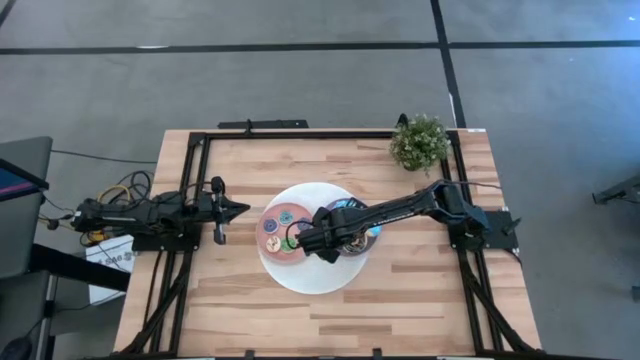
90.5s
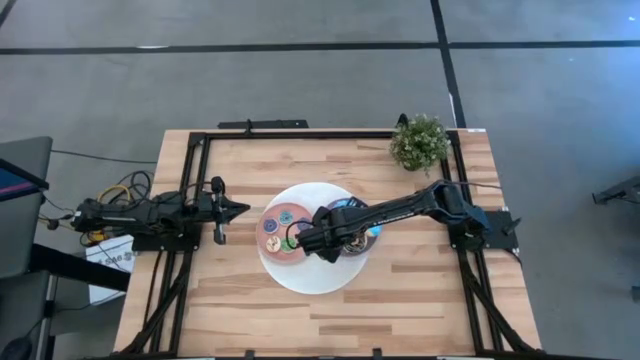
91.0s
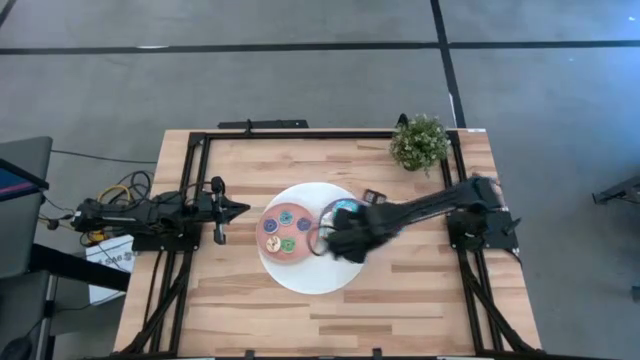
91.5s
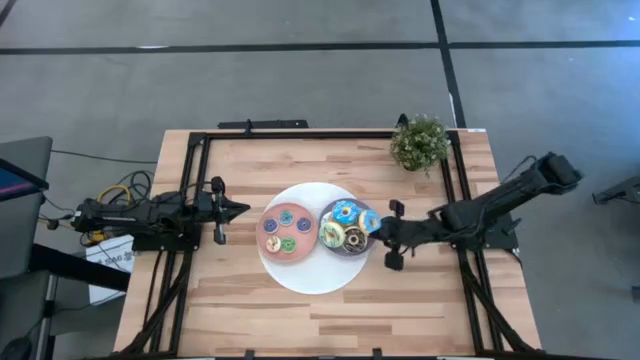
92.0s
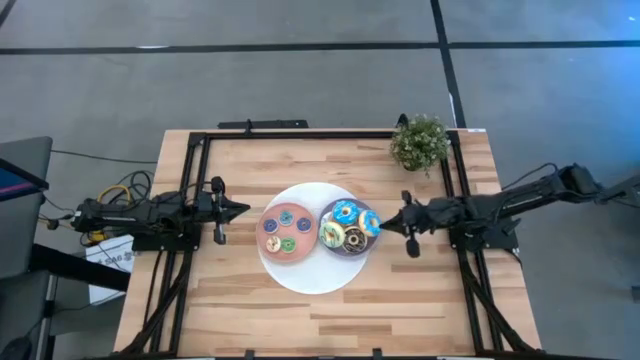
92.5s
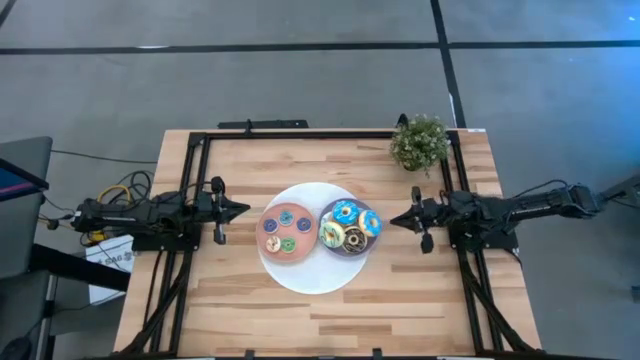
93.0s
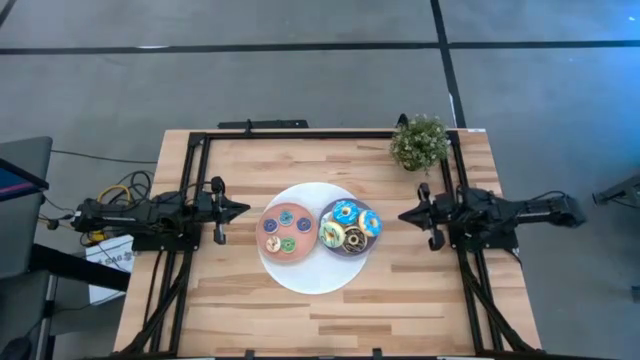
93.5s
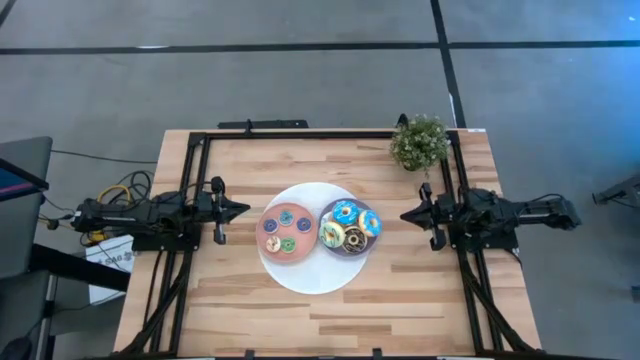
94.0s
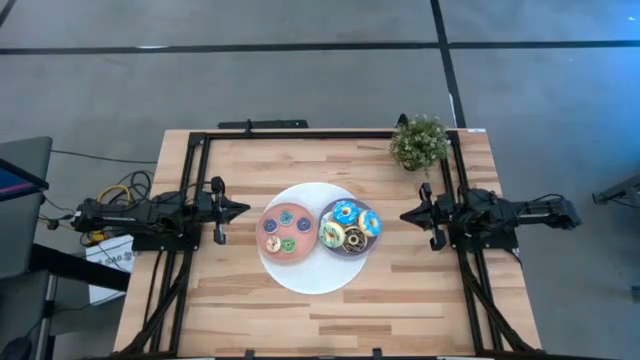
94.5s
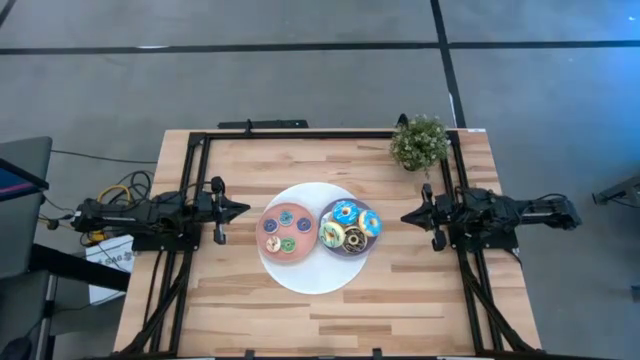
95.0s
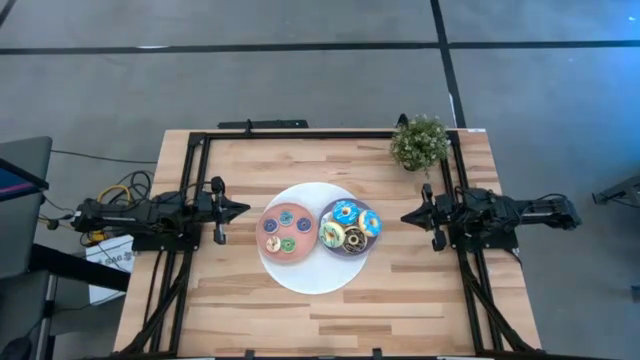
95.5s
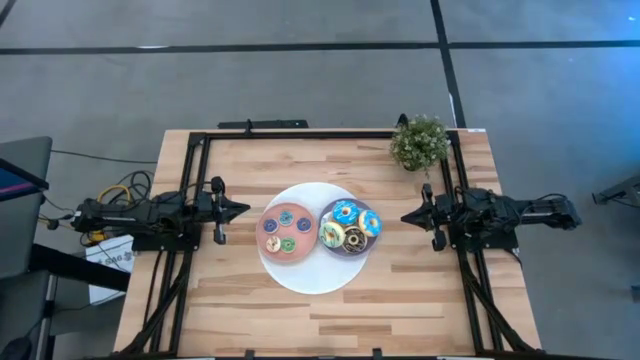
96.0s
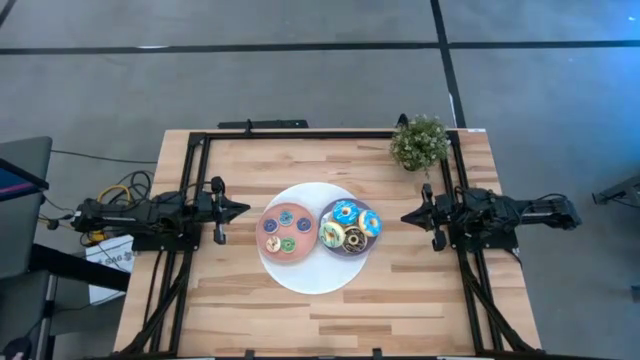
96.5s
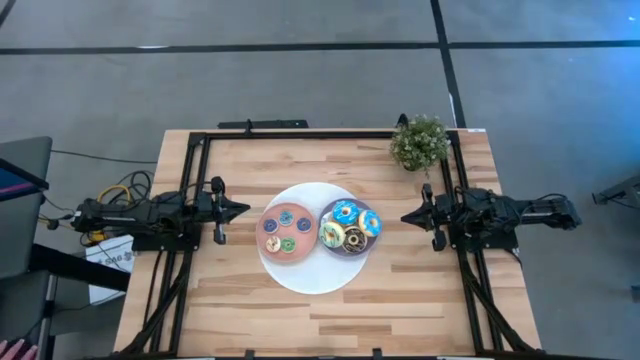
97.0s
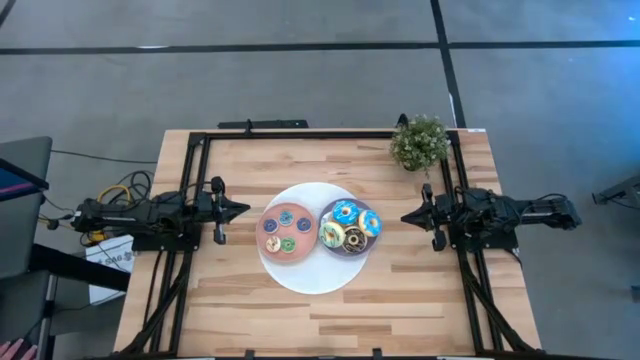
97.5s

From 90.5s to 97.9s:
Task: Pick & Place donuts
Return to Home Position

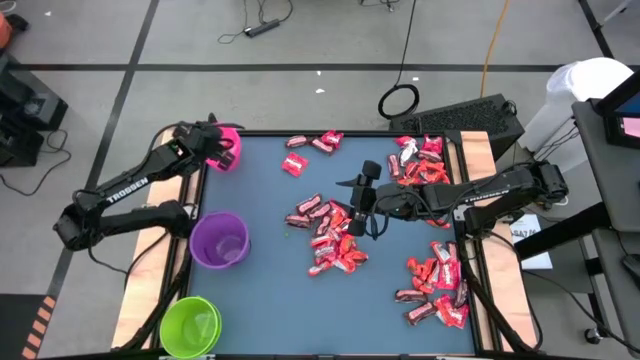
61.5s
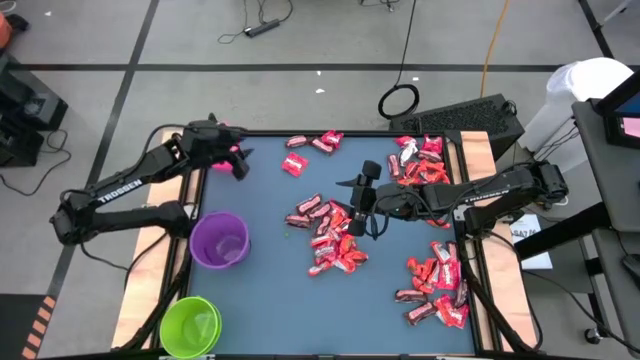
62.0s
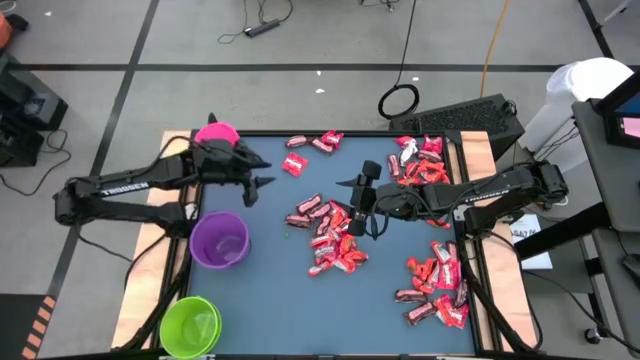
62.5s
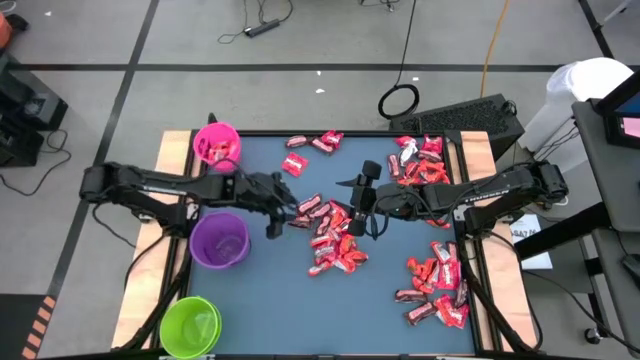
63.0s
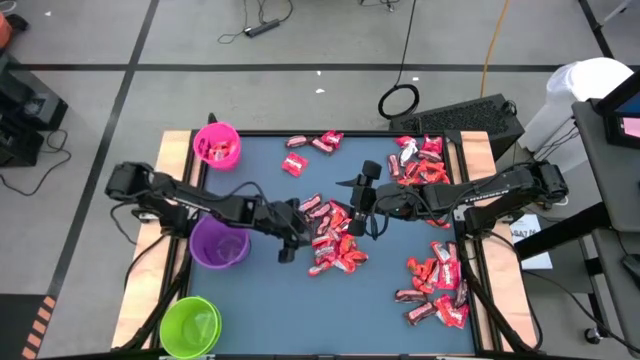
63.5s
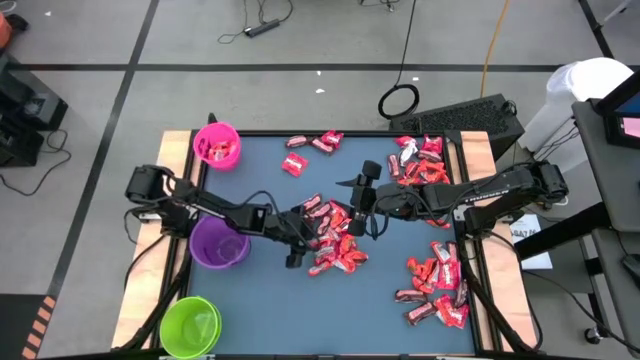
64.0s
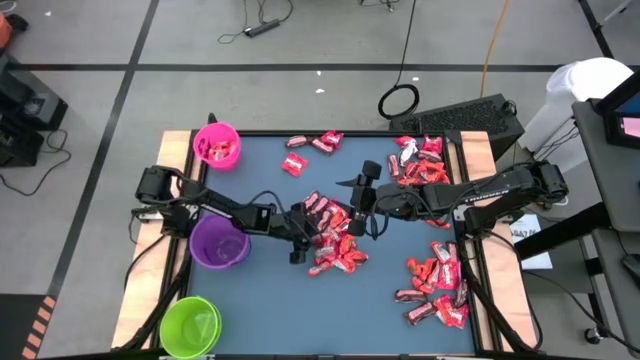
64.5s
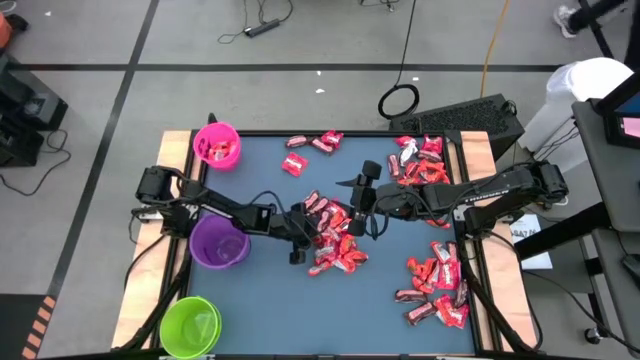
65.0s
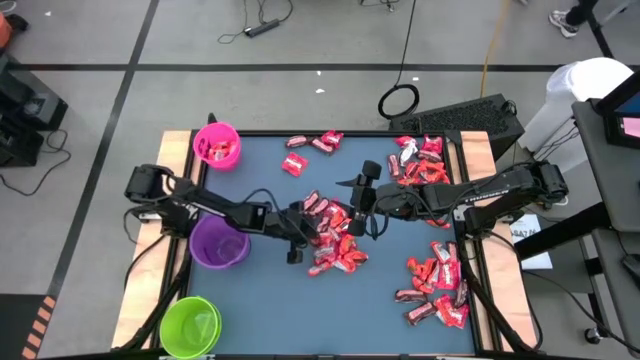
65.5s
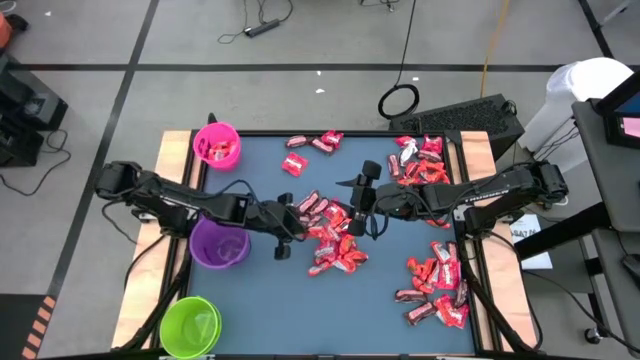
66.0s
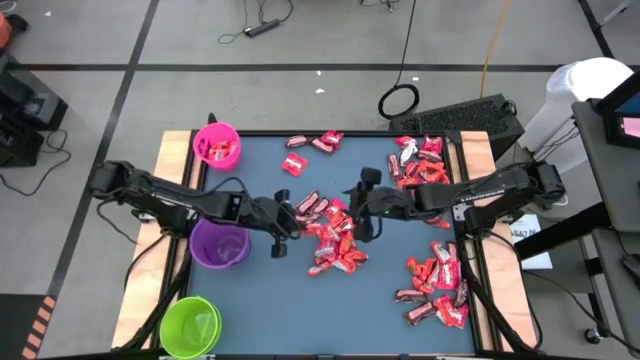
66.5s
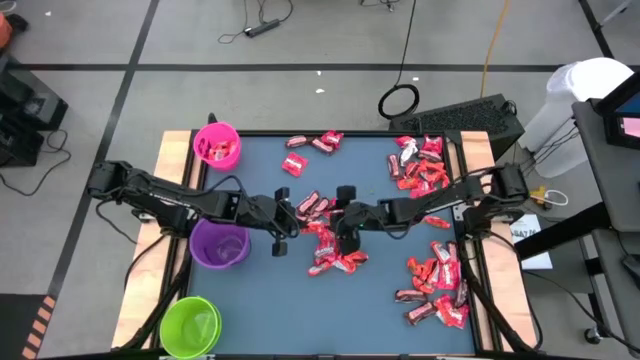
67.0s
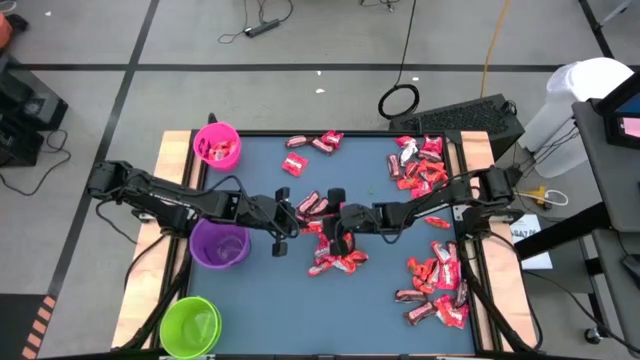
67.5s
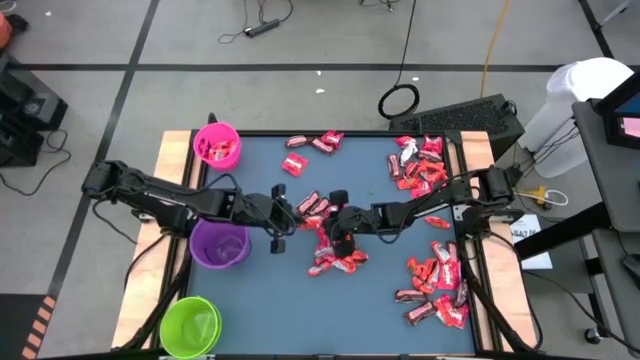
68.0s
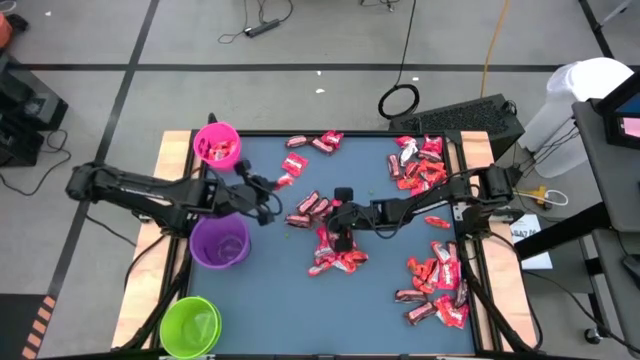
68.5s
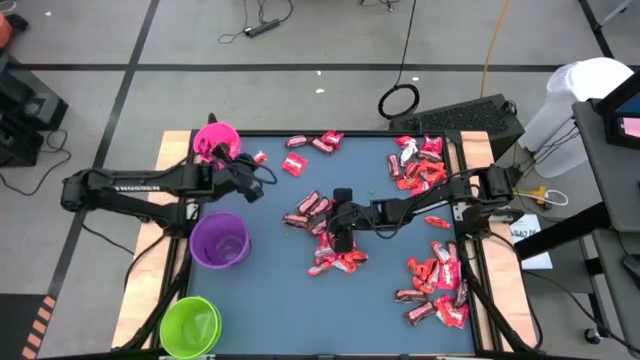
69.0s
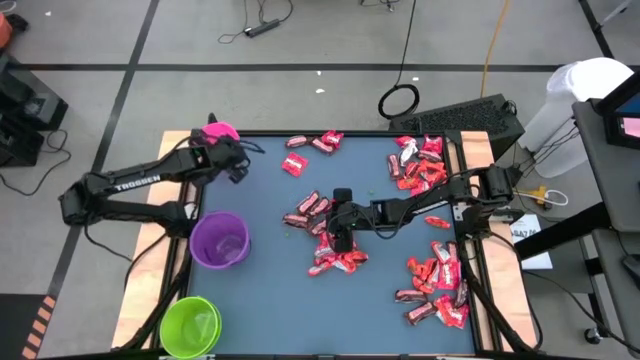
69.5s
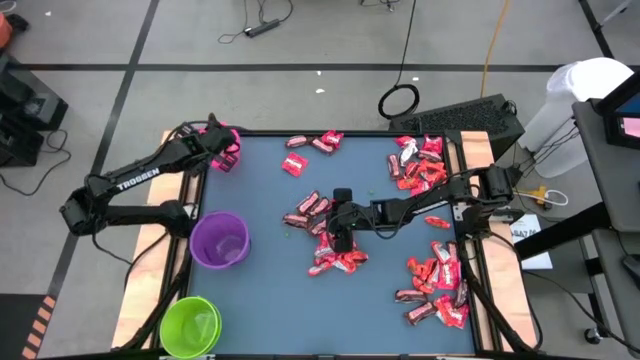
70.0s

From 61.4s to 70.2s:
Task: Organize candy in baskets
Put the orange chocolate into the pink bucket
